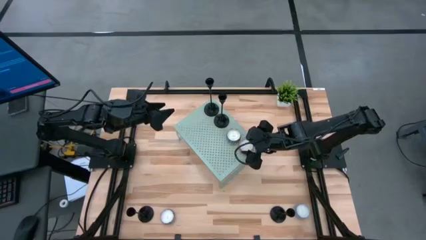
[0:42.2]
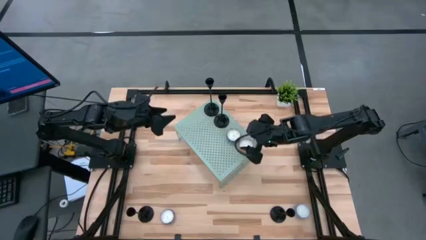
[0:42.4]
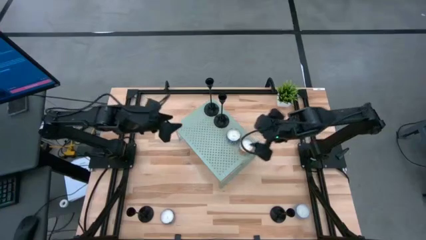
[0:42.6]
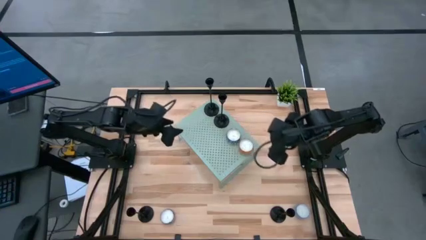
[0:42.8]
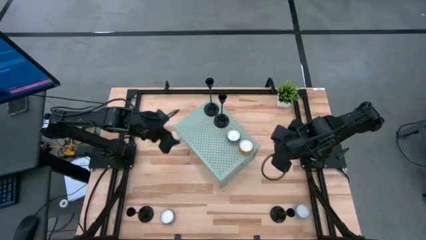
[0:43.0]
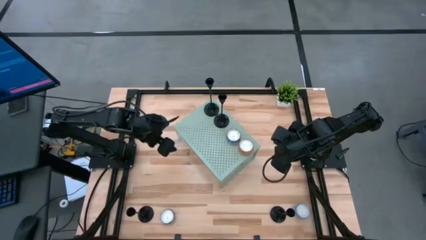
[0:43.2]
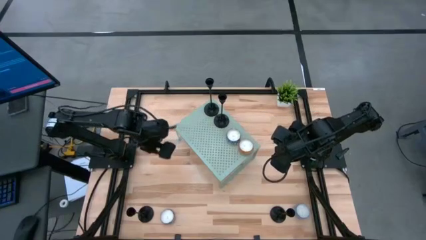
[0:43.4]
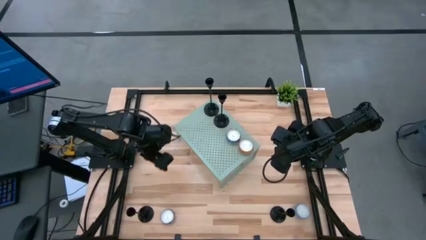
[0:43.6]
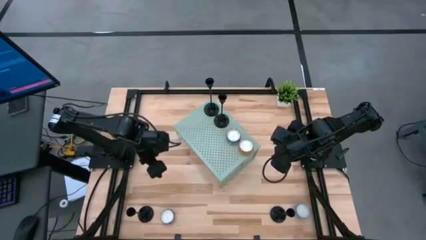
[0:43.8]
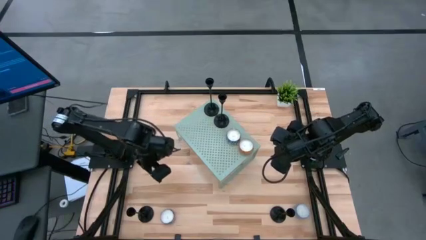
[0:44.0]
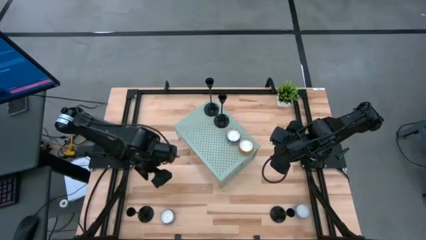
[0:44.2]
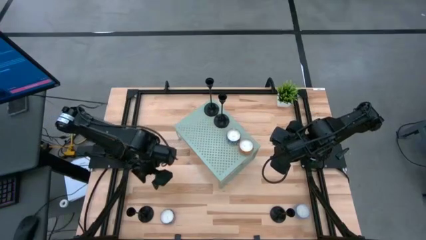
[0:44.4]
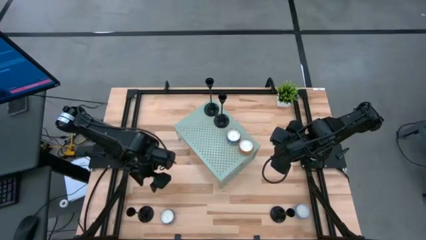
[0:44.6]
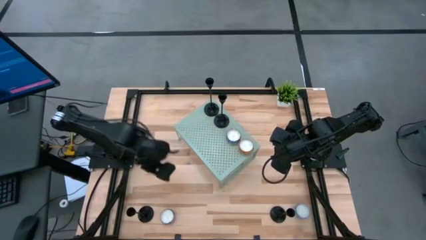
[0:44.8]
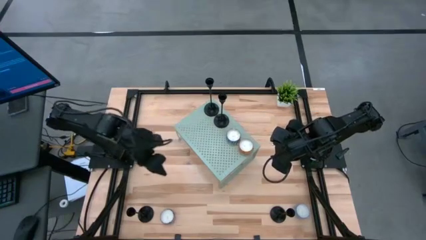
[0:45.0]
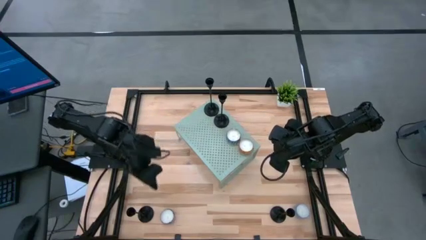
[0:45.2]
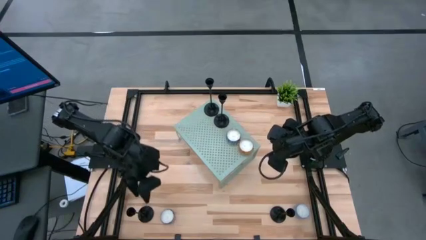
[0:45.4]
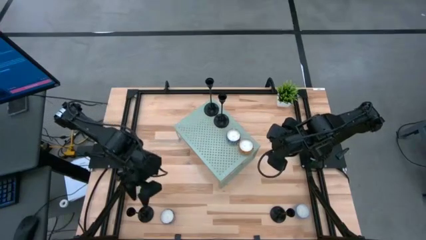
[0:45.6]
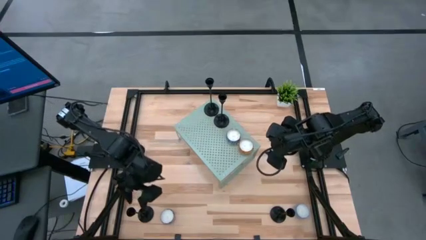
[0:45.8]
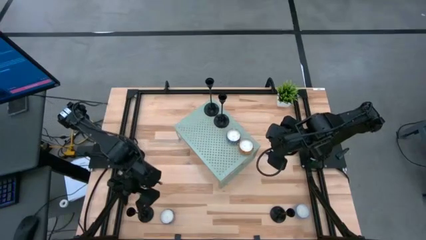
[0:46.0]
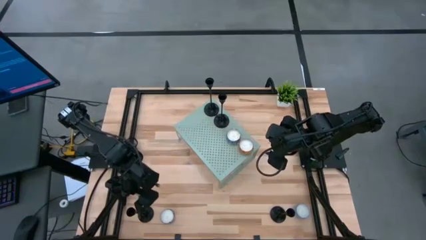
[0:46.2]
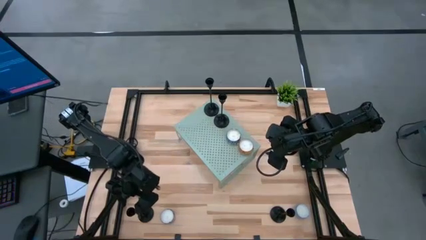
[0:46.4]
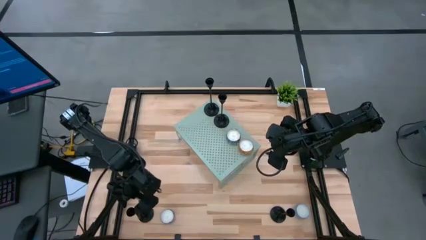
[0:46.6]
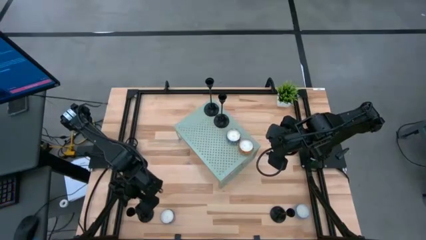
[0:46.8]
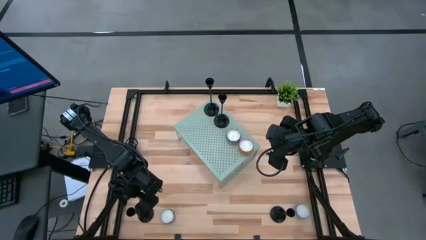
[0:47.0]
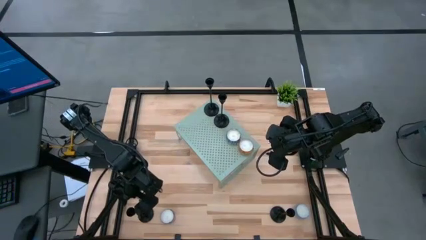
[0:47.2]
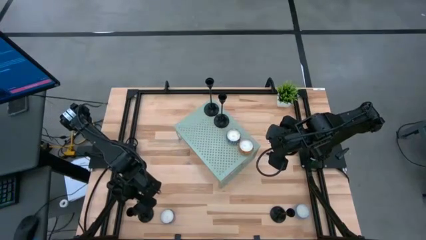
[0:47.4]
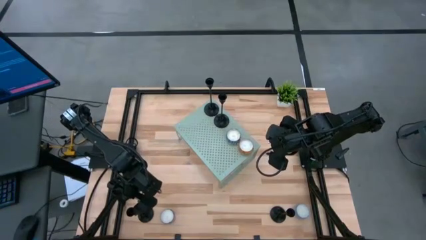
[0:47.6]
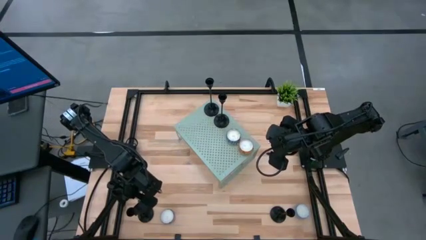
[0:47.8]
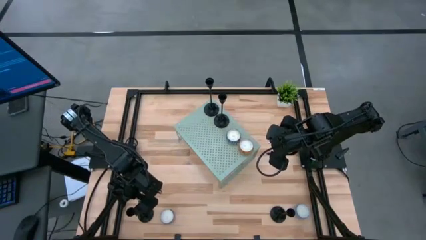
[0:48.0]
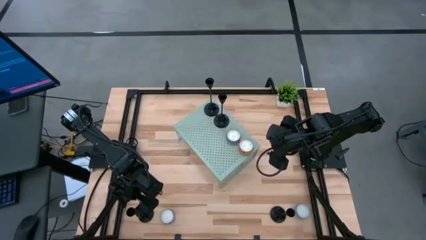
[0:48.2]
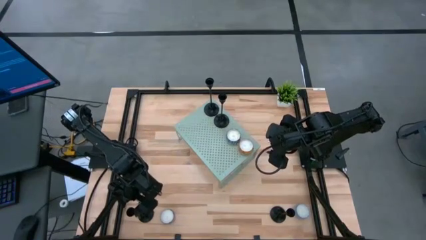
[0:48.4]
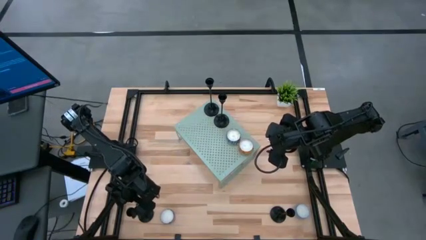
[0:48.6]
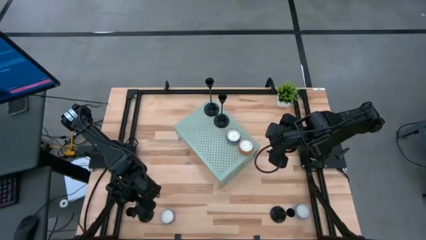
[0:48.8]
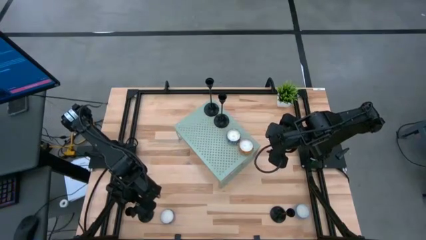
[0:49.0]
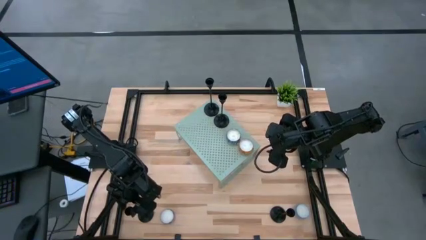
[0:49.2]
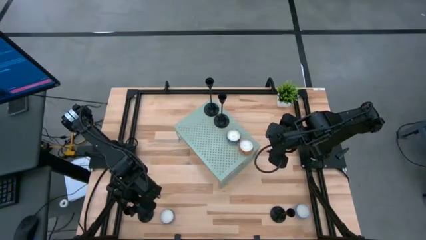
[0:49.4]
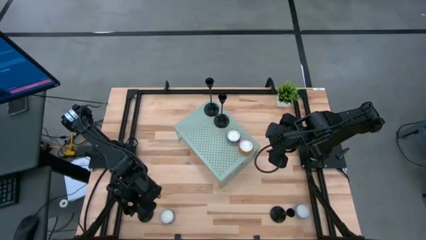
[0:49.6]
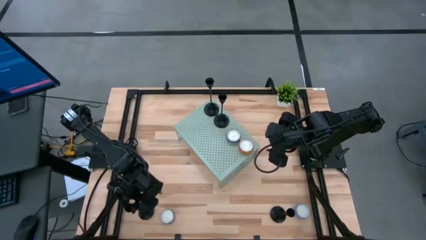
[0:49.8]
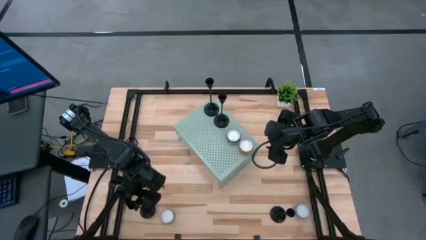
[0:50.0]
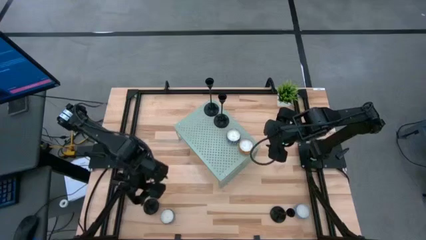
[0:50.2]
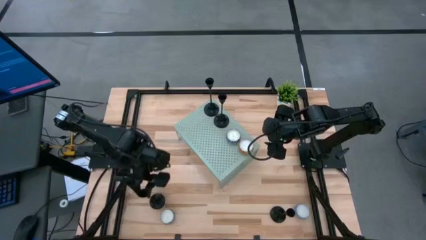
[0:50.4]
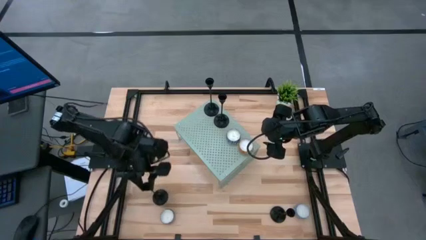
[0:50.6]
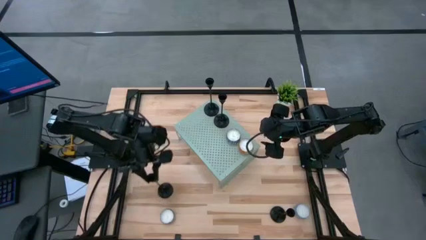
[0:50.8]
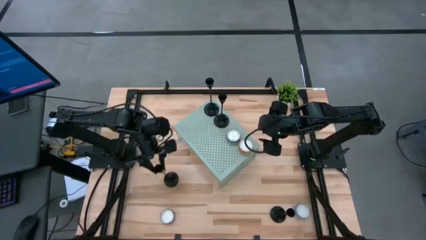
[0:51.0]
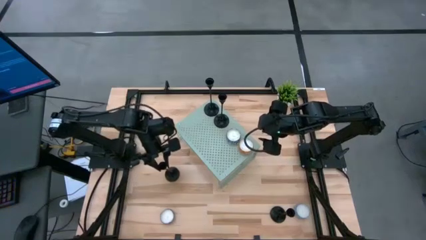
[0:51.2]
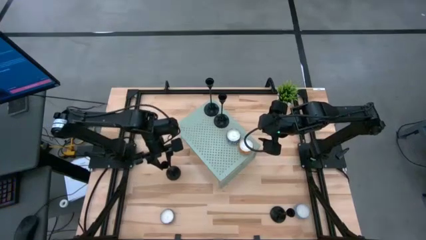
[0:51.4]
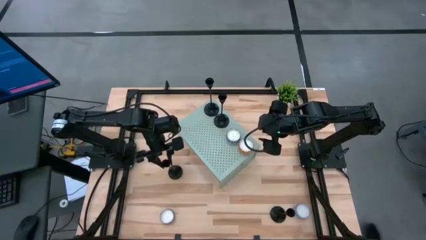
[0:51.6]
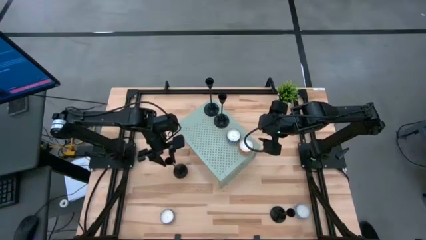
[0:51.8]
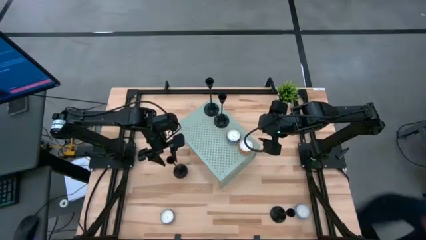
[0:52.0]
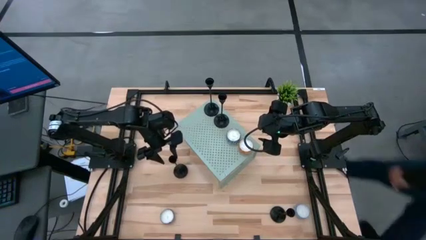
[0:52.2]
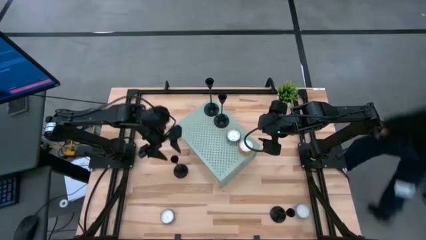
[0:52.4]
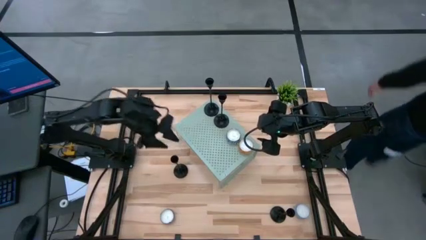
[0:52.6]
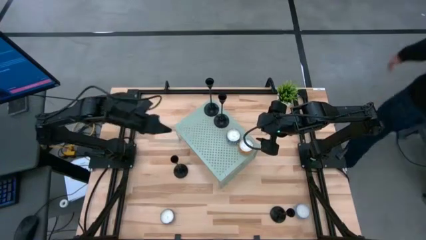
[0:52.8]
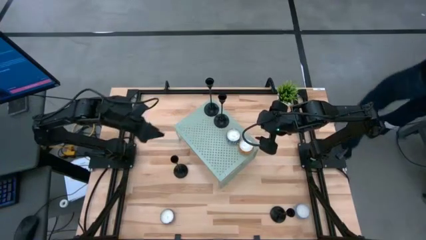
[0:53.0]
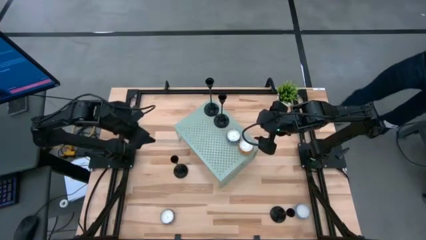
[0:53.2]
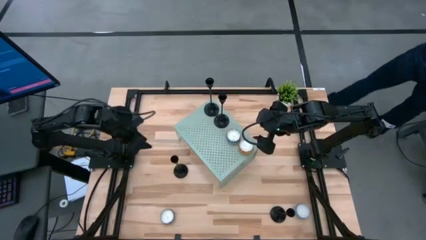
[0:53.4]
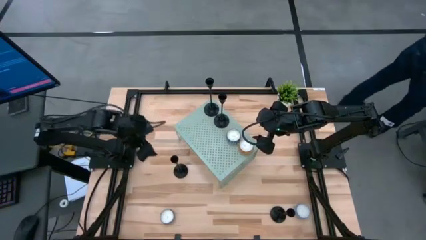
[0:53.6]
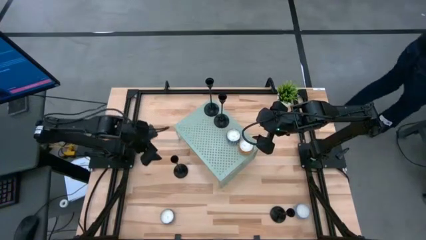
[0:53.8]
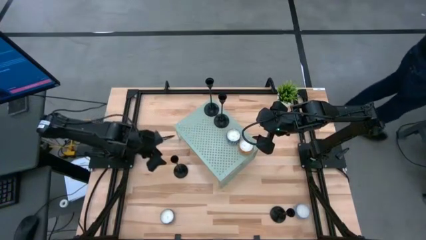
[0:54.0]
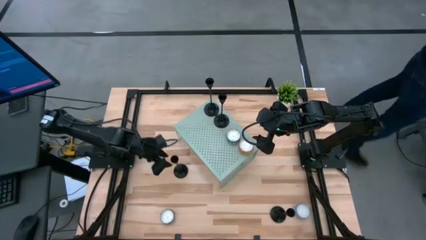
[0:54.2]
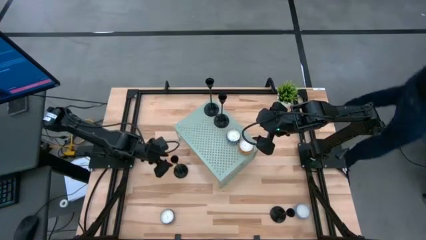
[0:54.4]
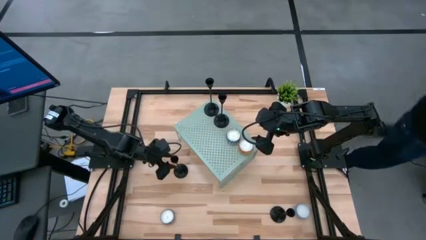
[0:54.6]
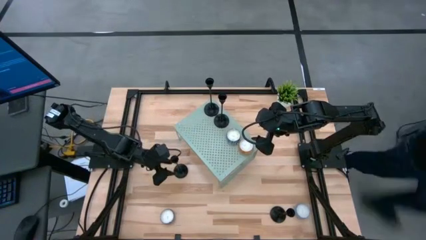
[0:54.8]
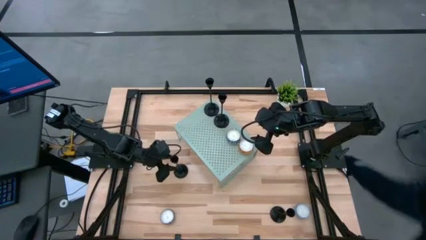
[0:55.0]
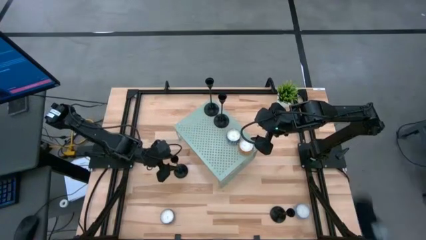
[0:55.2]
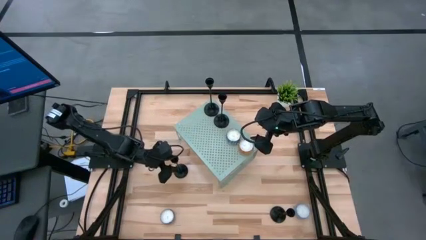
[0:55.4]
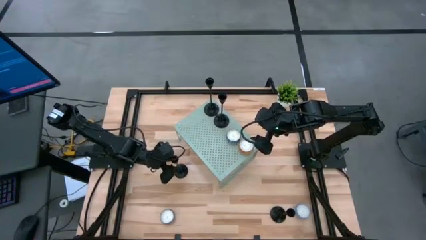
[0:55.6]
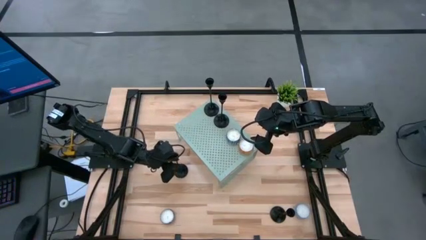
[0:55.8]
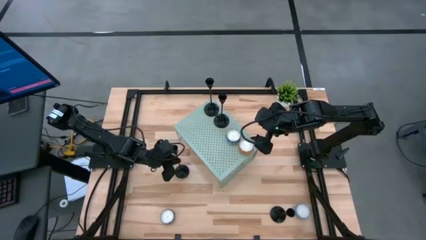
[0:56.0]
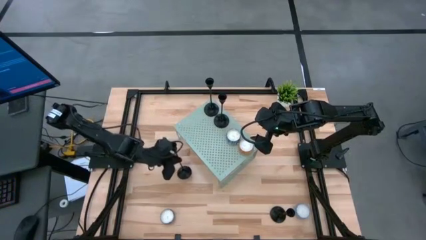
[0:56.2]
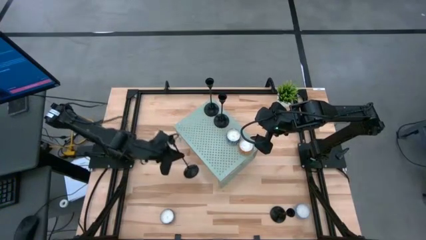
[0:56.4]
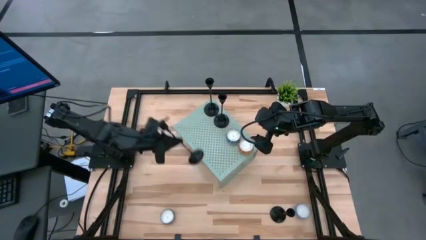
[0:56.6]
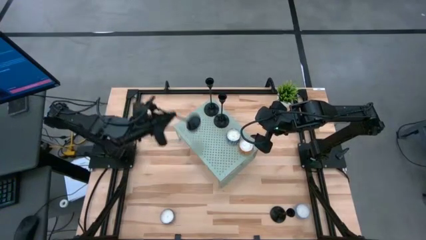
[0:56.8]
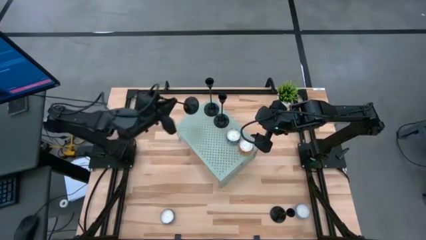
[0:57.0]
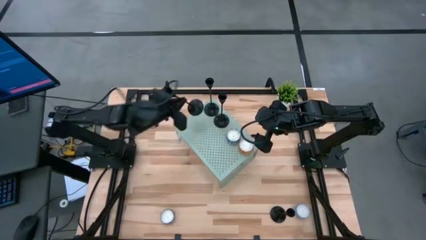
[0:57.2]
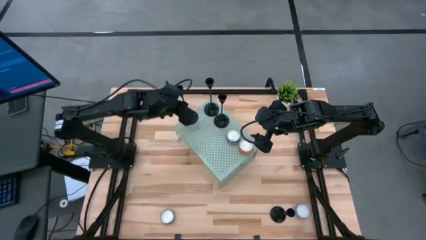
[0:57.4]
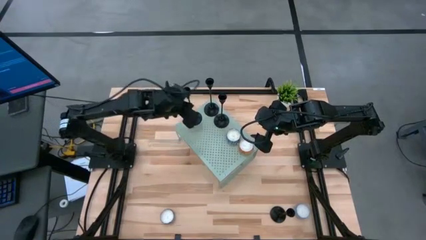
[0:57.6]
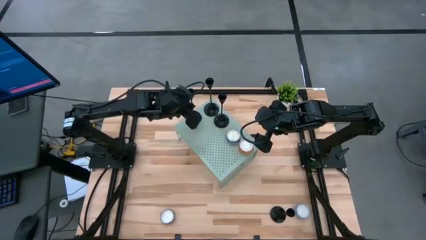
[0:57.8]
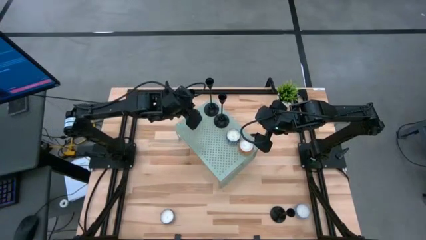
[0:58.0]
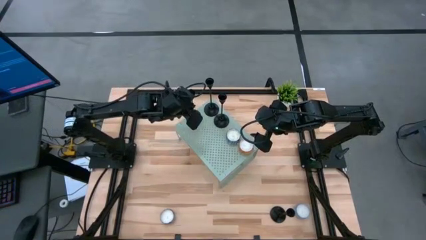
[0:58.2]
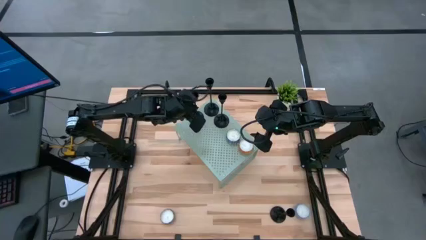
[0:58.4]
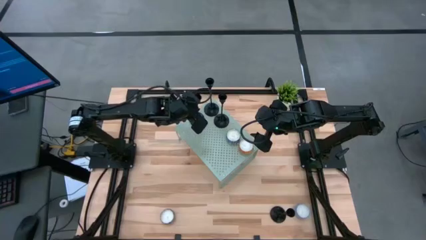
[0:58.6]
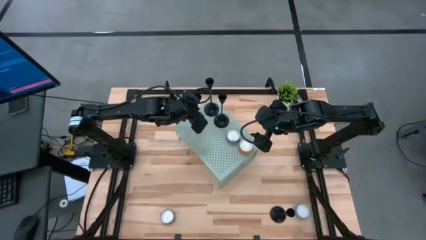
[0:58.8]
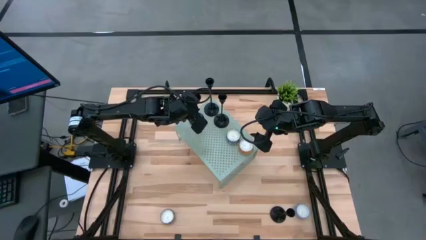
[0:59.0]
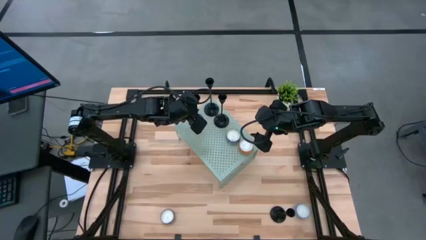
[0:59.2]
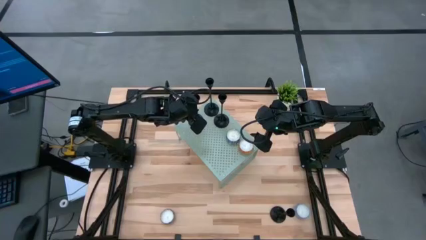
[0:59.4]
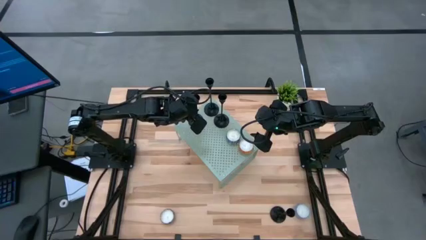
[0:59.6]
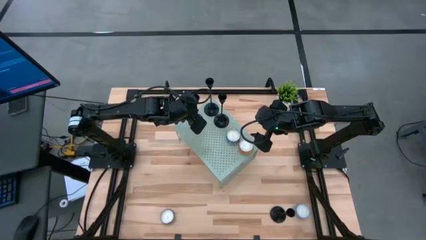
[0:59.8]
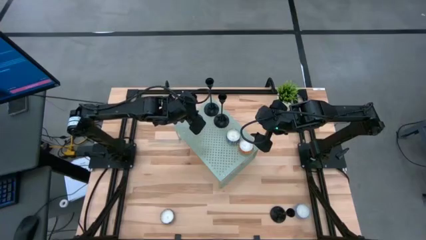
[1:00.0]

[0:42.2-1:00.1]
Task: Pick & Place candle stick holders
Put the left black candle holder on the shelf
